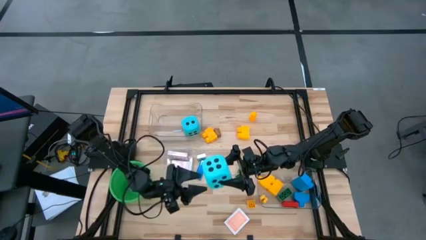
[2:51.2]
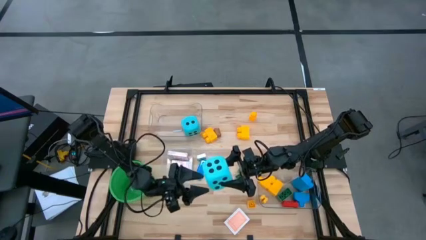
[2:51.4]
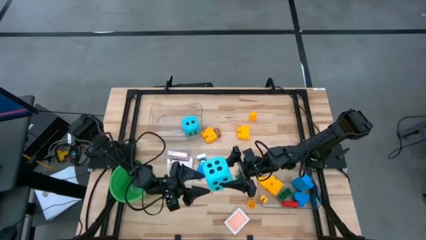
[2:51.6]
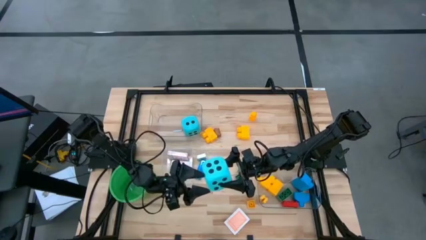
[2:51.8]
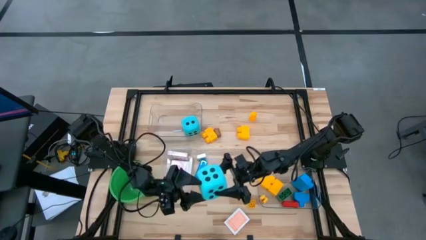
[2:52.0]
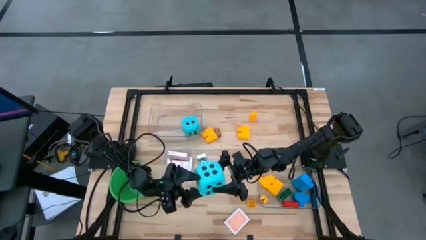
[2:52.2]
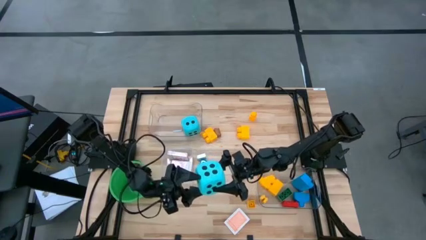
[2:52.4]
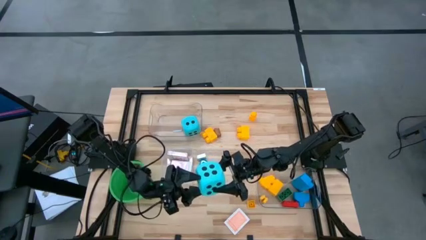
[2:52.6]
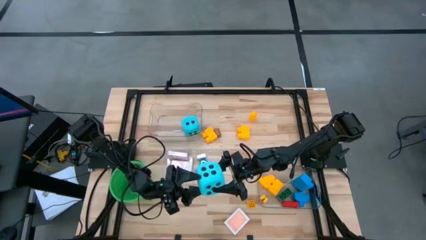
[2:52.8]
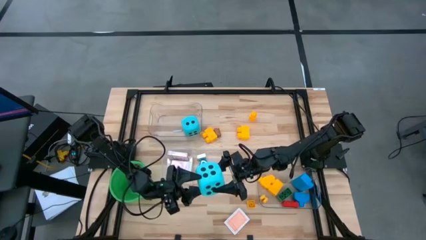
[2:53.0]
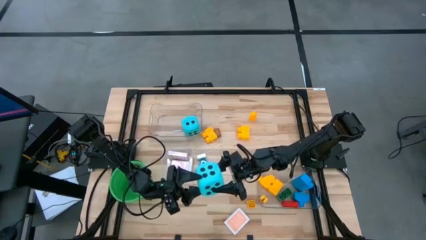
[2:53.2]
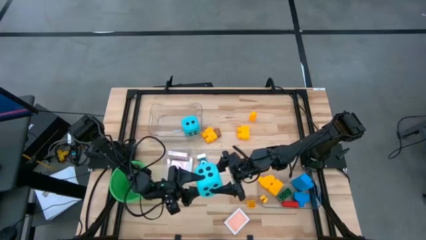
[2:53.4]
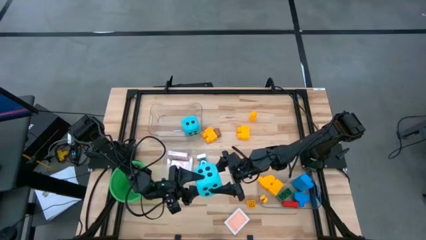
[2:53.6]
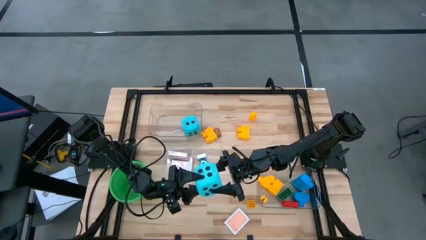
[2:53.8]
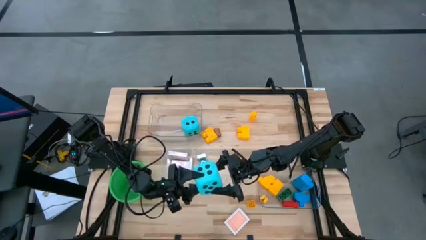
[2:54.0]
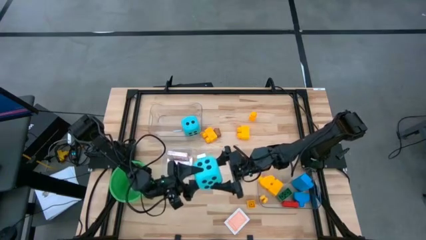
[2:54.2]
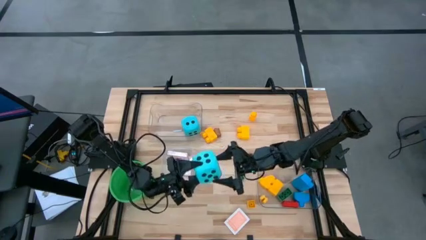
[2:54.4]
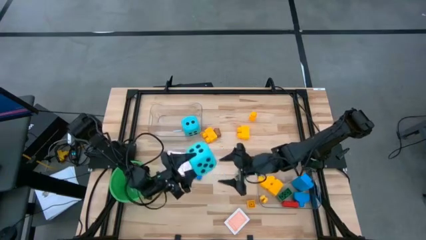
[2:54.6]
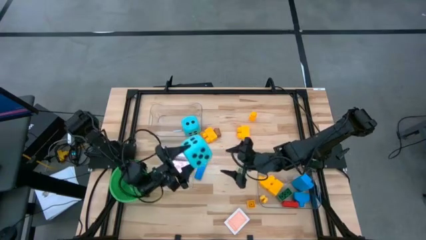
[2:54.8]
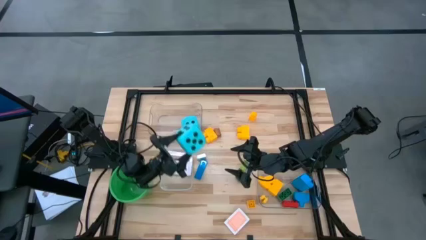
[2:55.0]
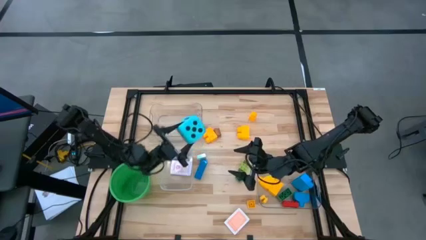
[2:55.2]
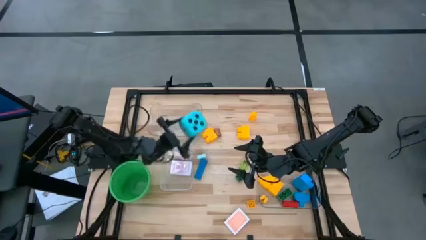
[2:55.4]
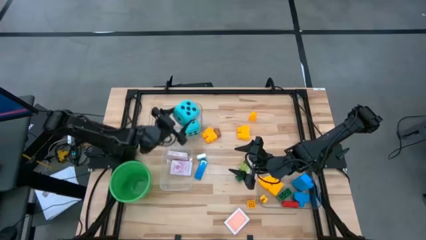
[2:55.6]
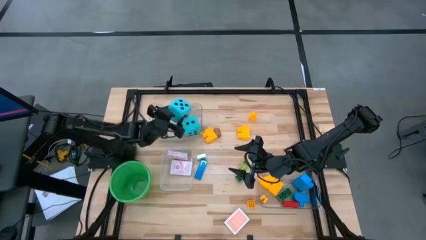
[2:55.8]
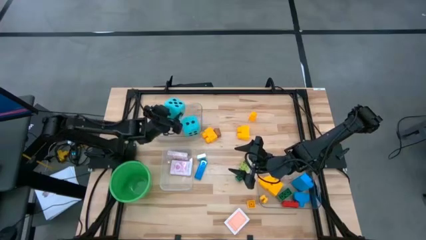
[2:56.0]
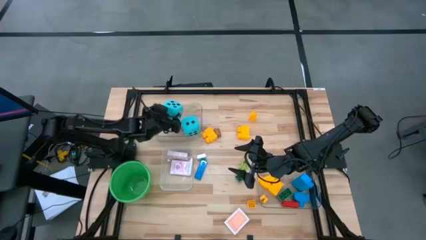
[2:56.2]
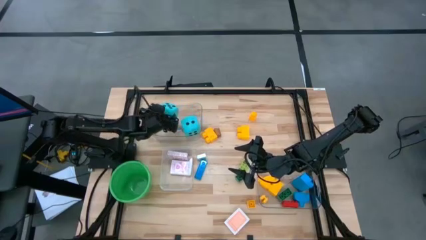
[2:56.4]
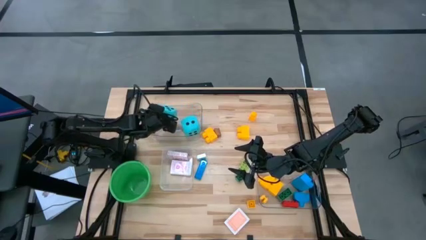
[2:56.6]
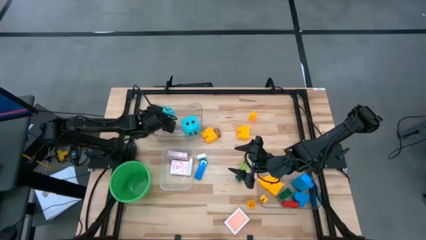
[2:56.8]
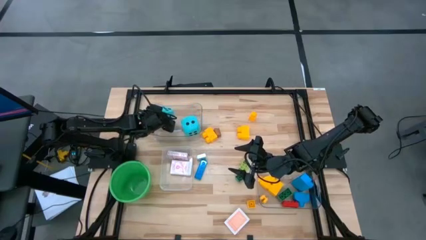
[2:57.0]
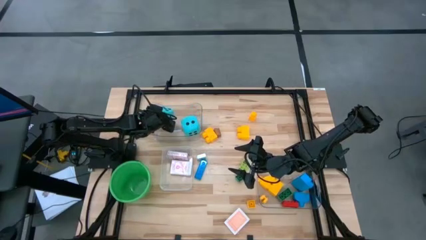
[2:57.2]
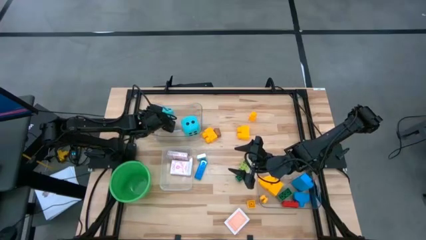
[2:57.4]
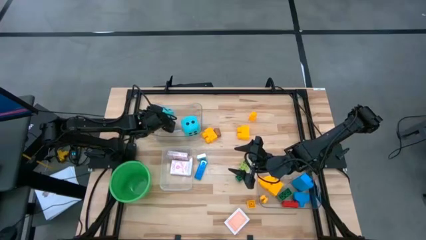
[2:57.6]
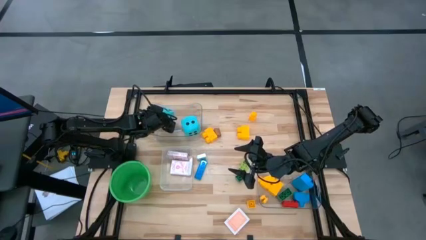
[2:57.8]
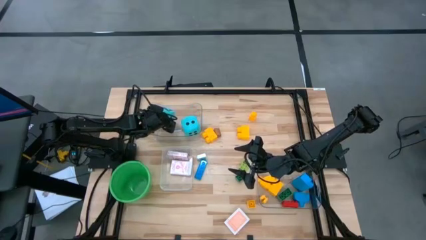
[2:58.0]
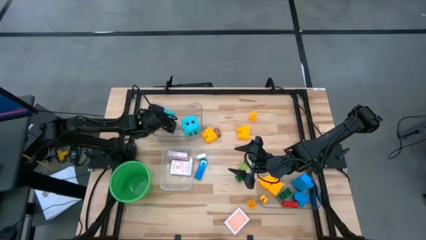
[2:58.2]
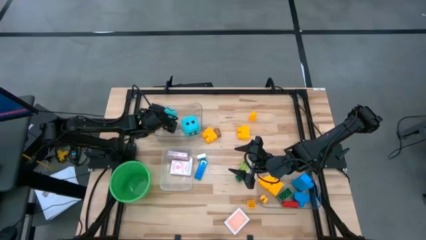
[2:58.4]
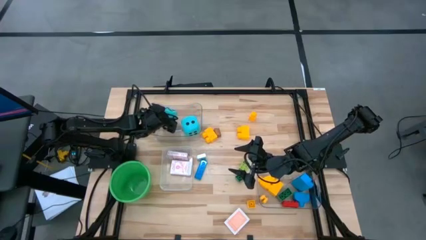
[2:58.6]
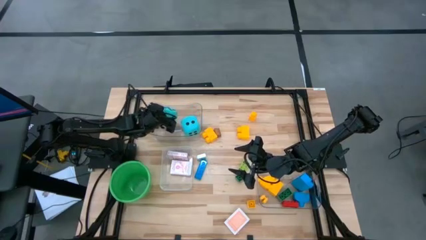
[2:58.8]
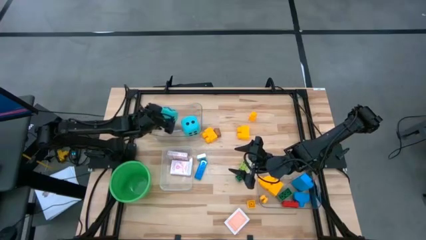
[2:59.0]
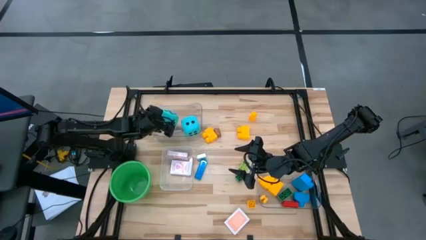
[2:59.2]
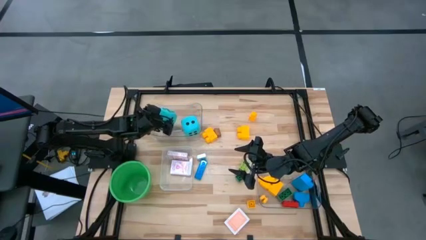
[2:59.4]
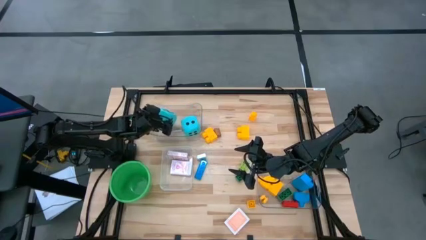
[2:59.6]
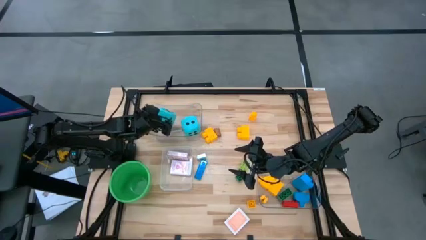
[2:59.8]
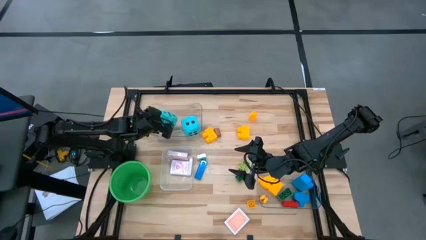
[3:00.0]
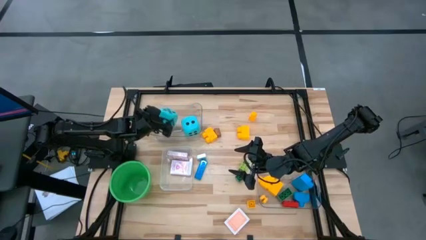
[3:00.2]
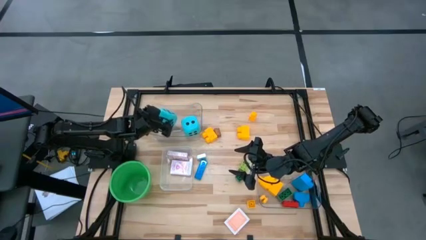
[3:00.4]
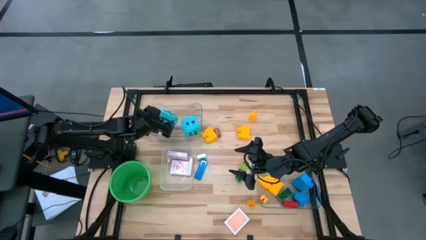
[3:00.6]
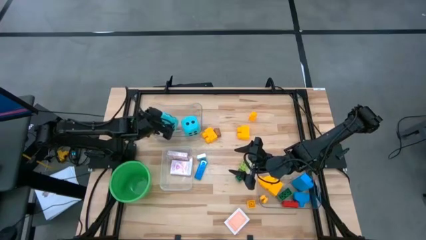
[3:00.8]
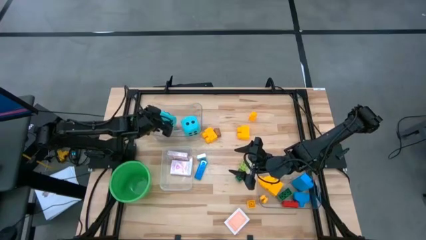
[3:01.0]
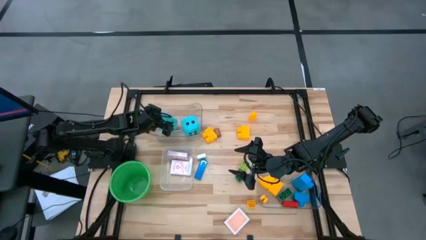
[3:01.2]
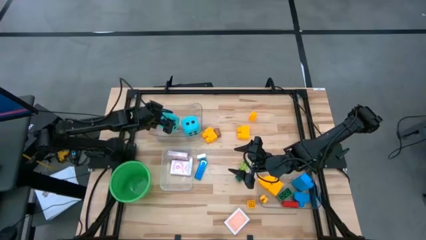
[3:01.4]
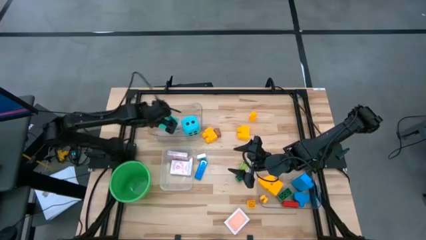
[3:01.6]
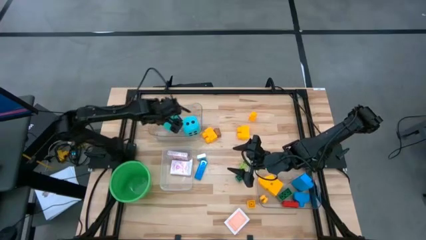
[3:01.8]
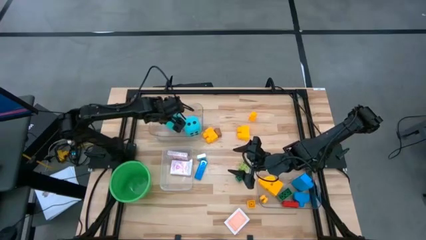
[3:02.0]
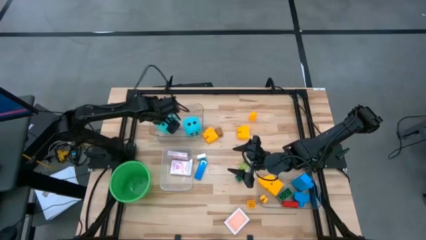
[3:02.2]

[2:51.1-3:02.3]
Task: Pick & Place Toys
Put the light blue dice into the top transparent bin

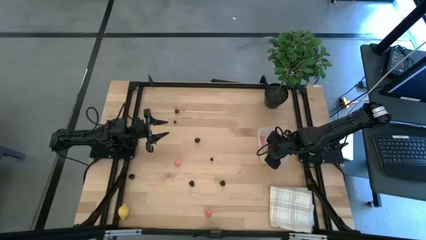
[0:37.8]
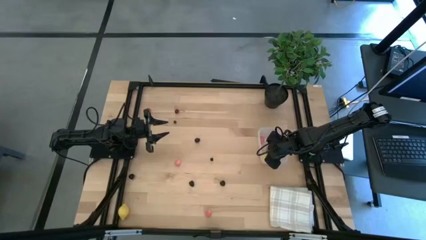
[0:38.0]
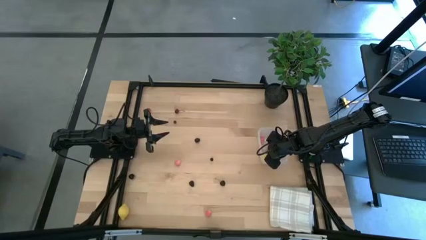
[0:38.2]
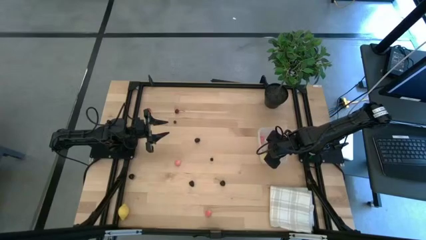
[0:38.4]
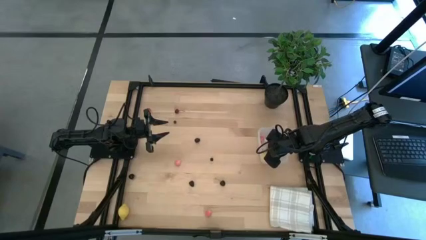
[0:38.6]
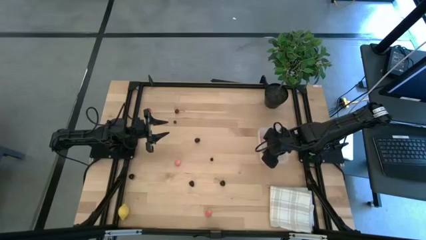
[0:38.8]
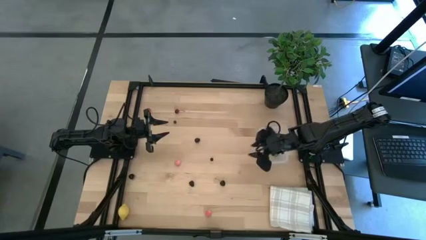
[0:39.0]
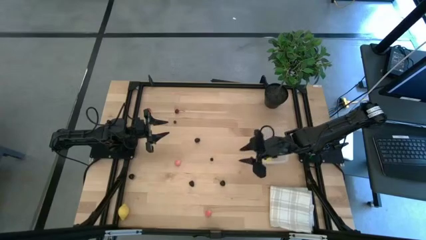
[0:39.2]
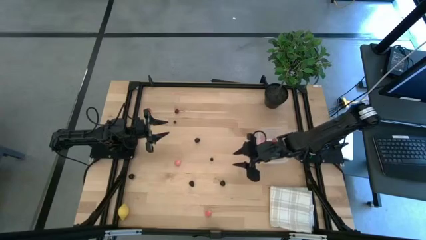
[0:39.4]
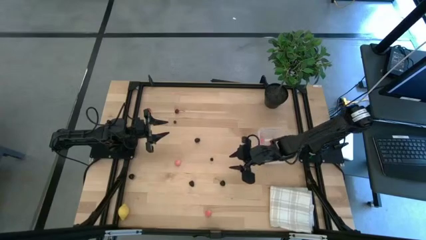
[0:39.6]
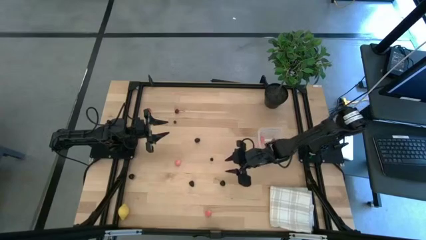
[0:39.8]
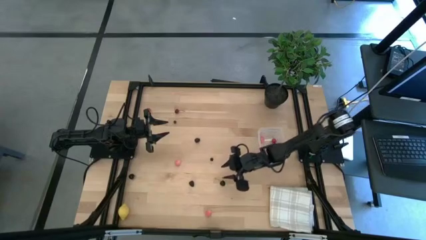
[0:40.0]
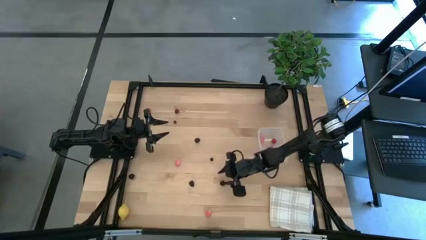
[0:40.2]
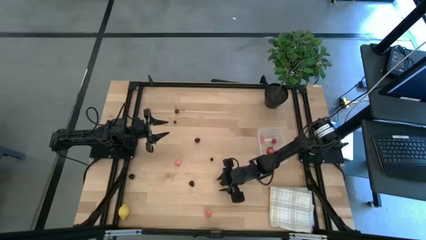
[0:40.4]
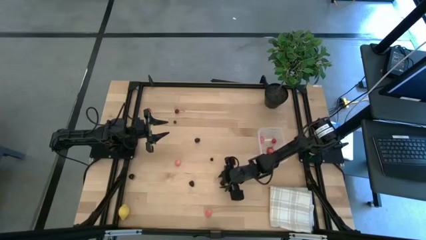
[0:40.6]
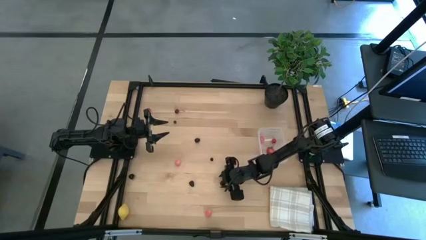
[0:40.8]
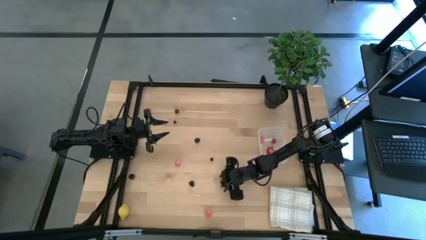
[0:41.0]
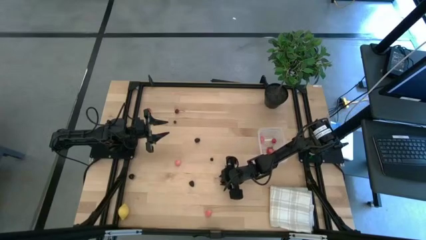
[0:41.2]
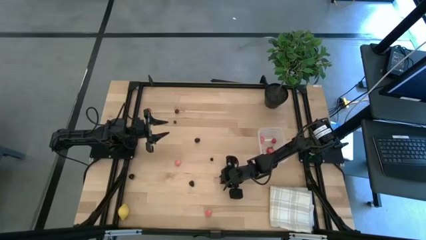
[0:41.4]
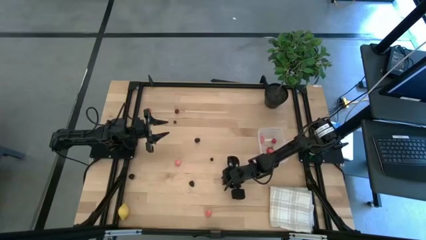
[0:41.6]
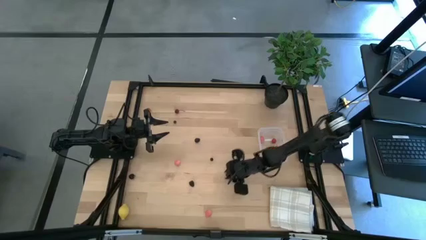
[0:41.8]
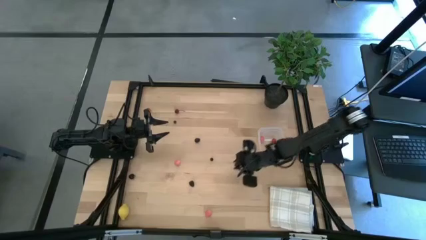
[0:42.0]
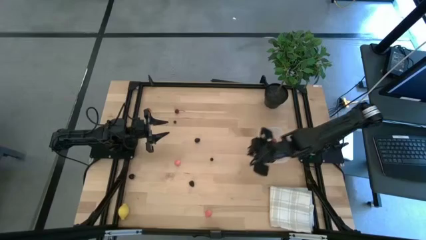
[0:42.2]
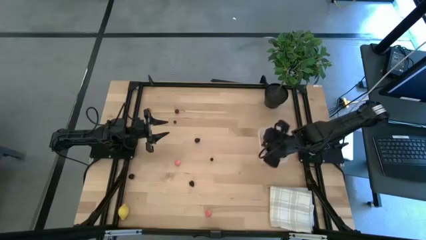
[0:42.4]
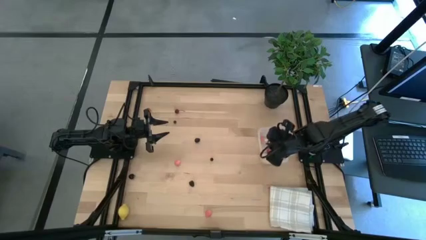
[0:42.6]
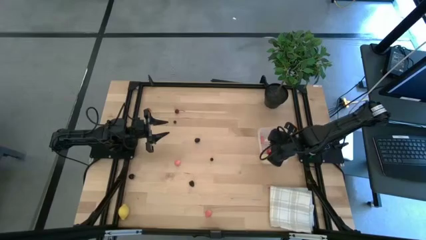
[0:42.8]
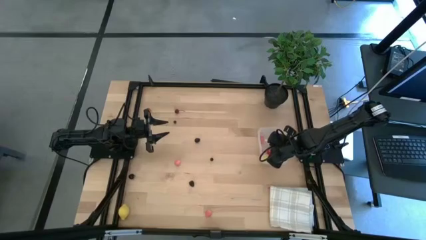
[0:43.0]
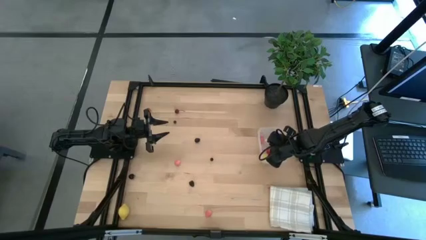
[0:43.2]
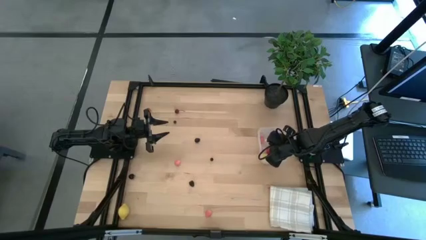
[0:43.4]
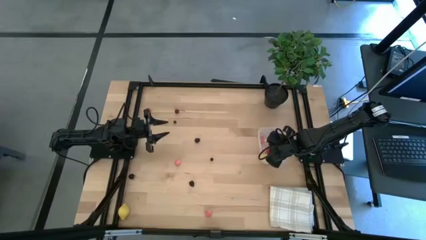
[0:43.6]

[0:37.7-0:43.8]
Task: Pick and placing Produce into tupperware
Put the right cherry into the transparent bin
